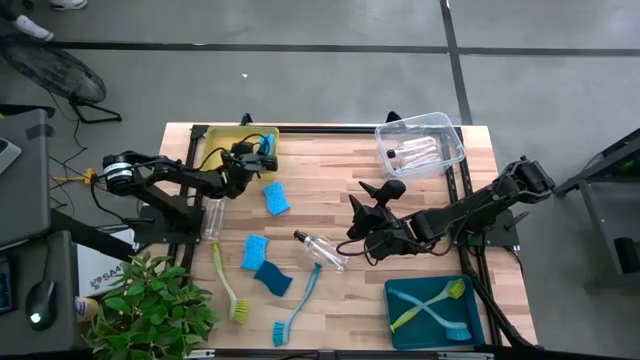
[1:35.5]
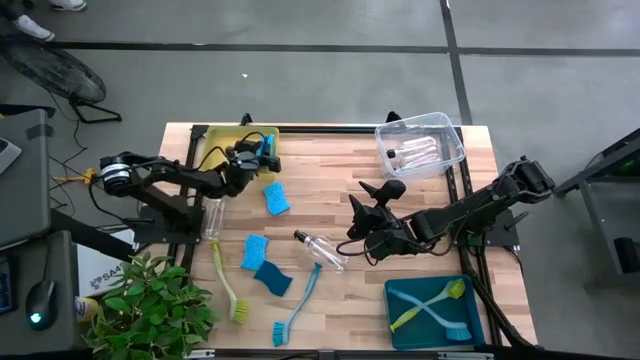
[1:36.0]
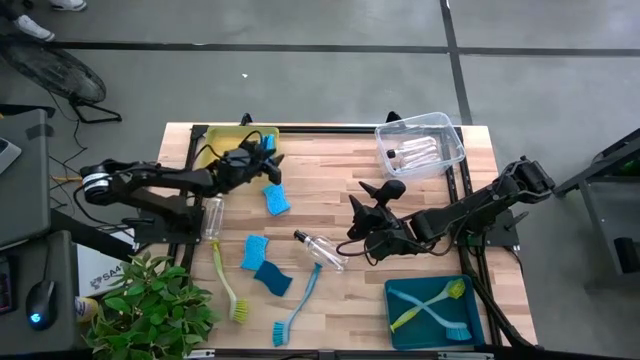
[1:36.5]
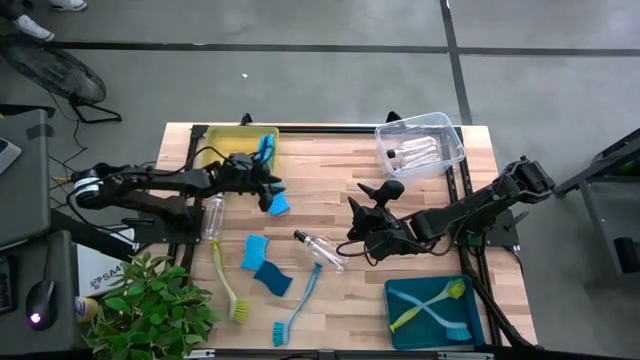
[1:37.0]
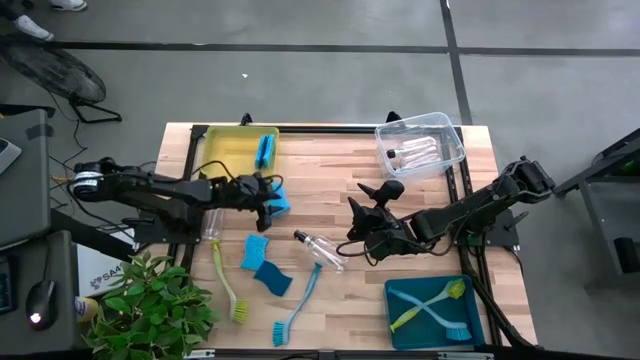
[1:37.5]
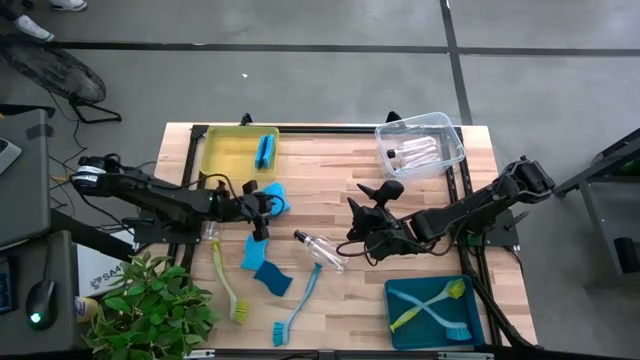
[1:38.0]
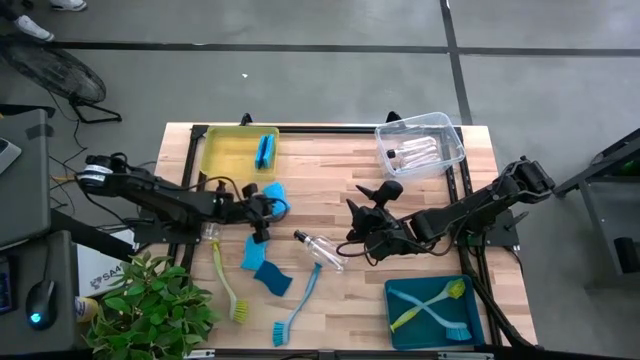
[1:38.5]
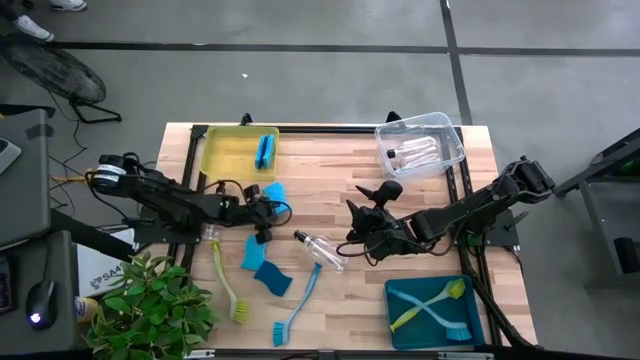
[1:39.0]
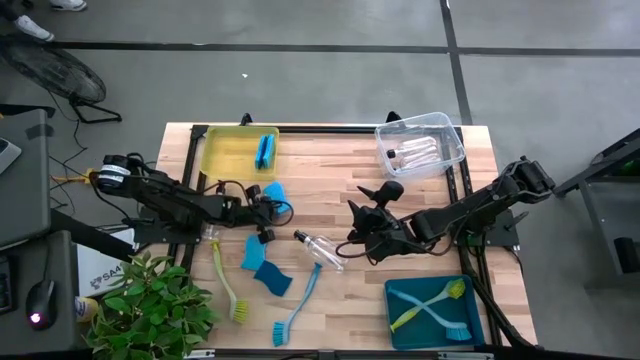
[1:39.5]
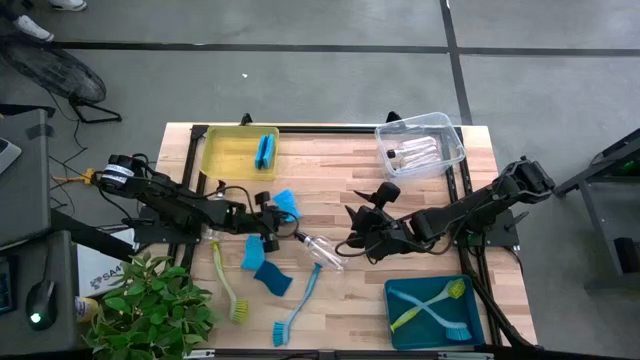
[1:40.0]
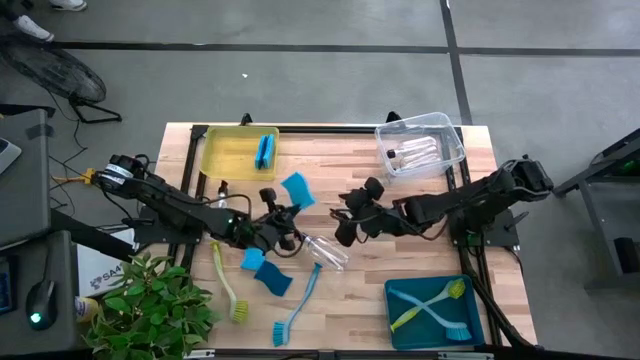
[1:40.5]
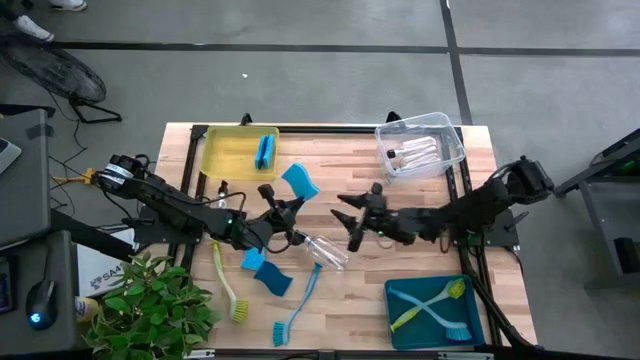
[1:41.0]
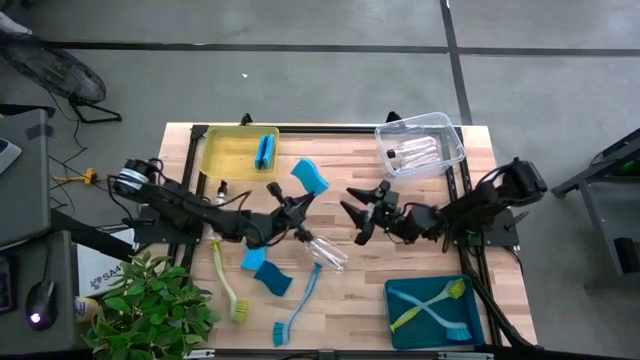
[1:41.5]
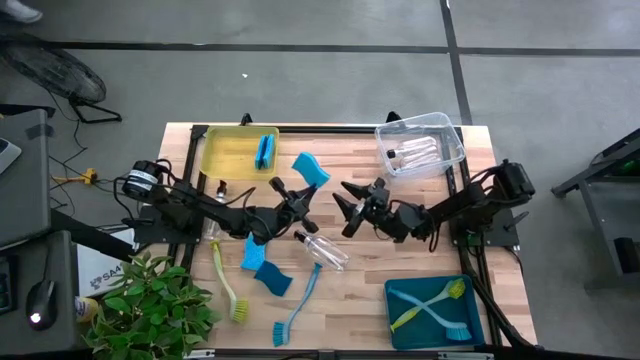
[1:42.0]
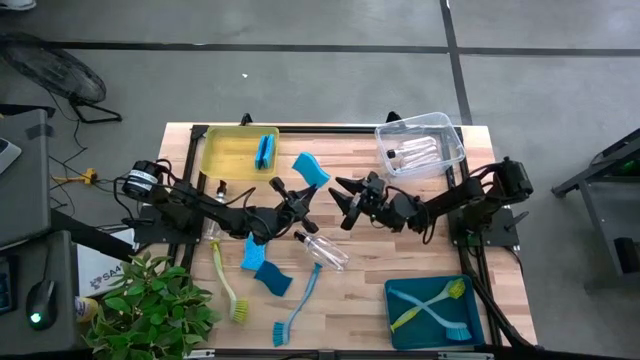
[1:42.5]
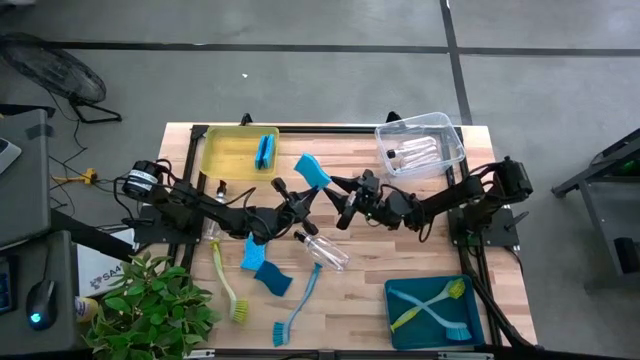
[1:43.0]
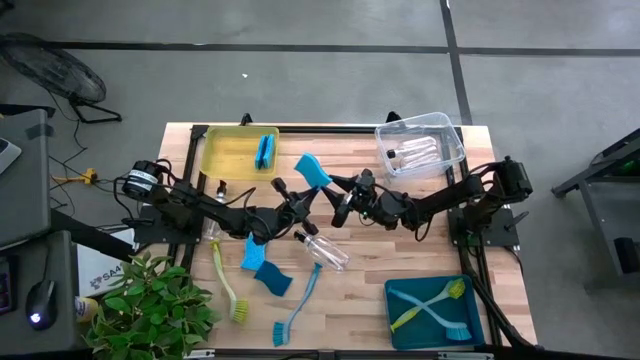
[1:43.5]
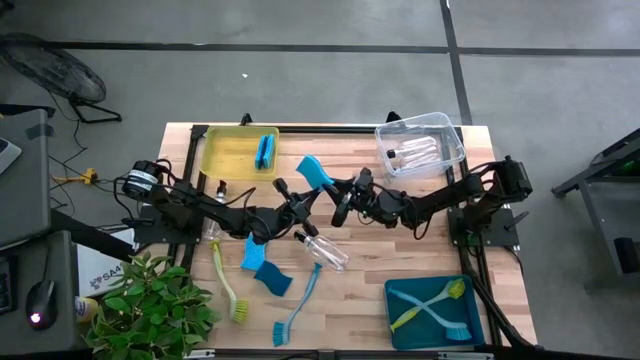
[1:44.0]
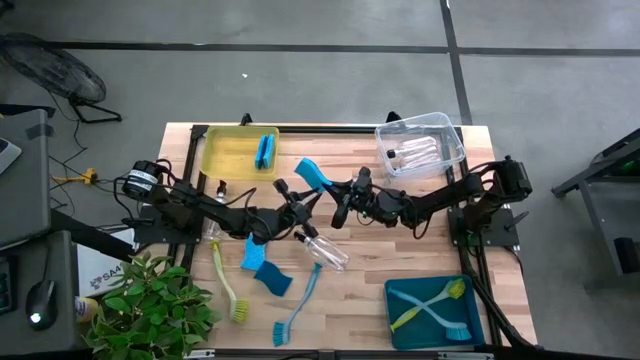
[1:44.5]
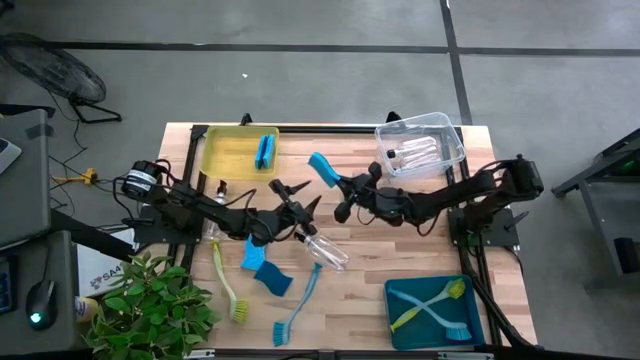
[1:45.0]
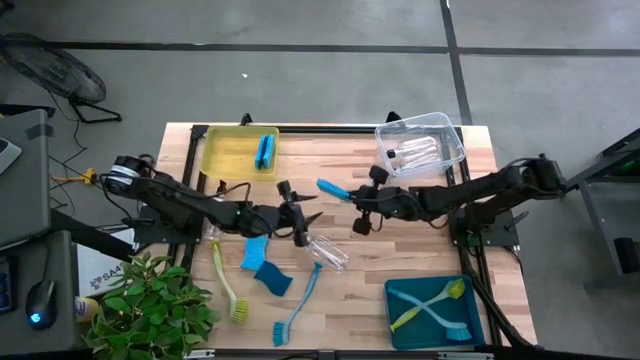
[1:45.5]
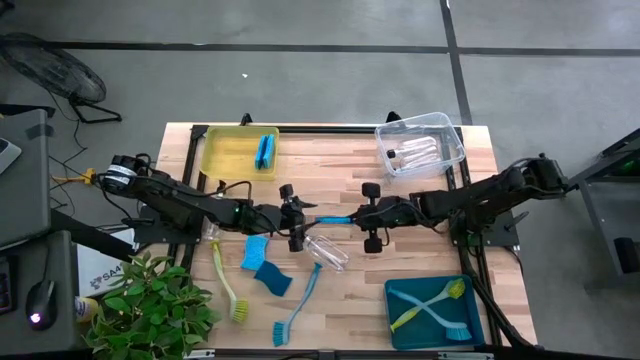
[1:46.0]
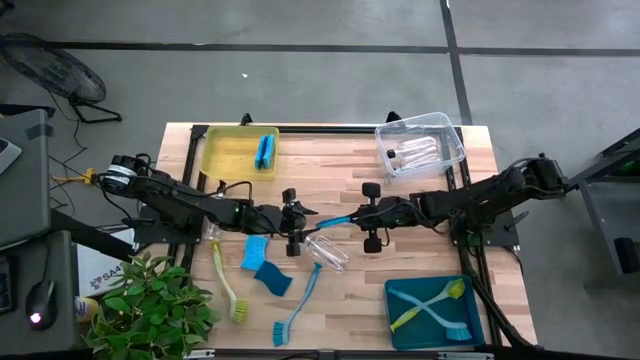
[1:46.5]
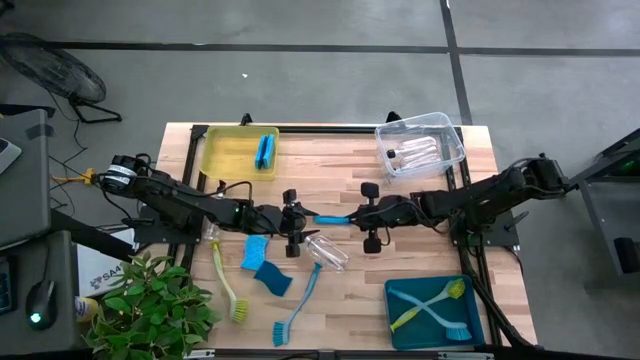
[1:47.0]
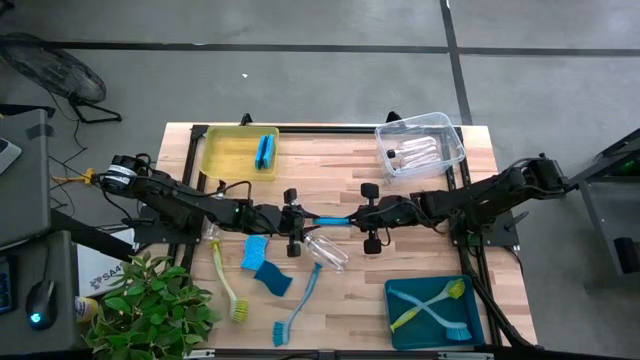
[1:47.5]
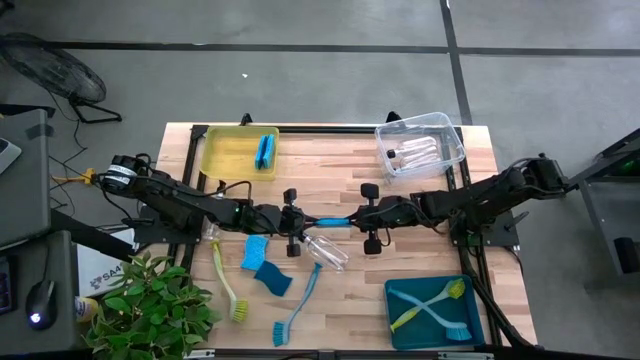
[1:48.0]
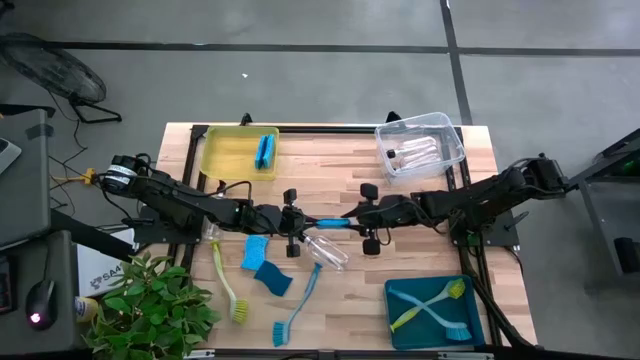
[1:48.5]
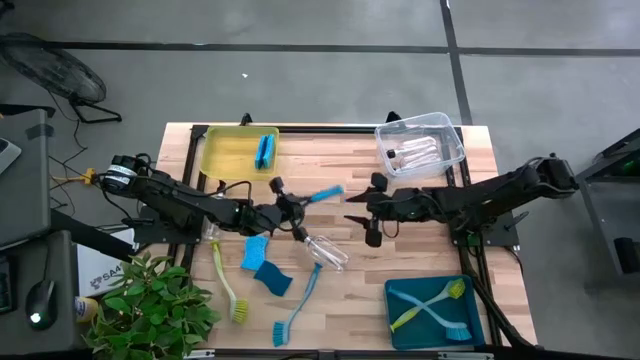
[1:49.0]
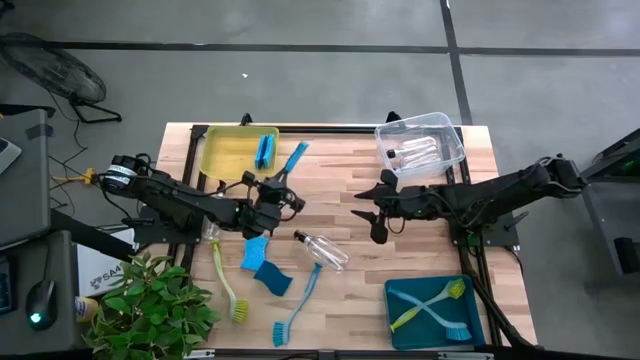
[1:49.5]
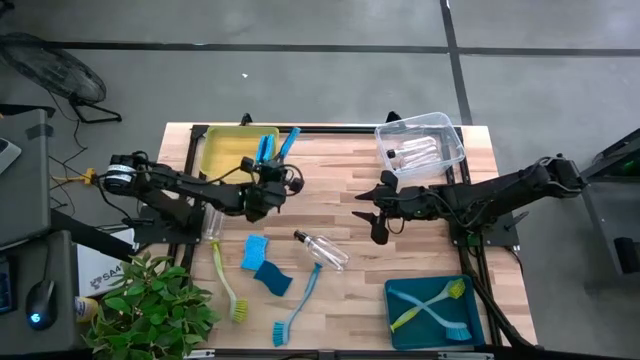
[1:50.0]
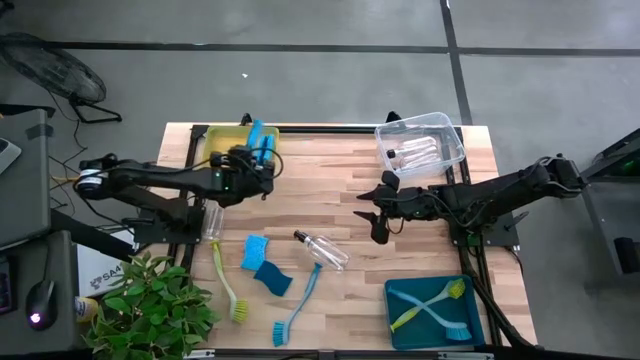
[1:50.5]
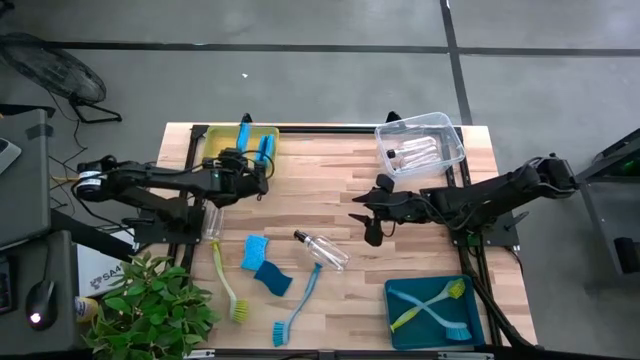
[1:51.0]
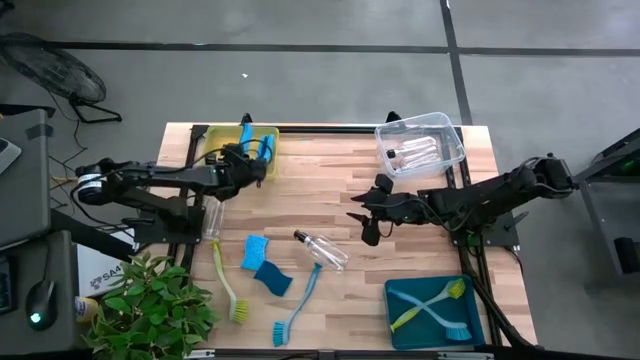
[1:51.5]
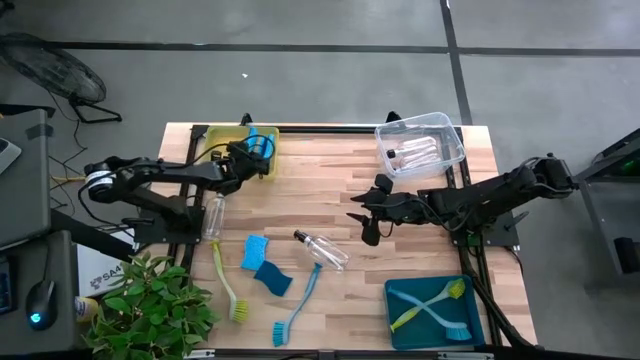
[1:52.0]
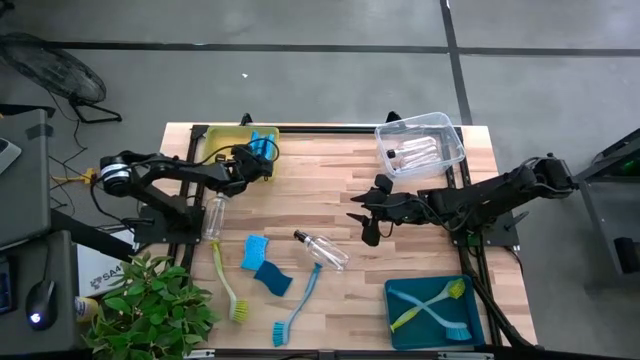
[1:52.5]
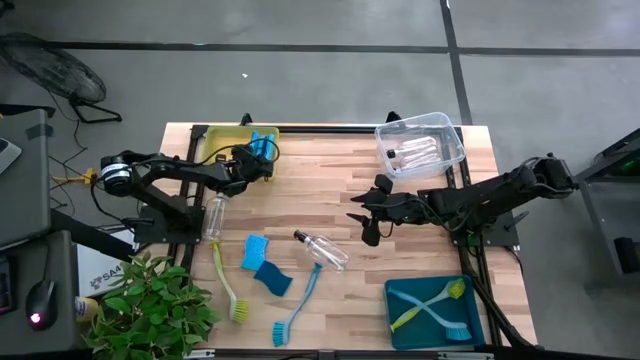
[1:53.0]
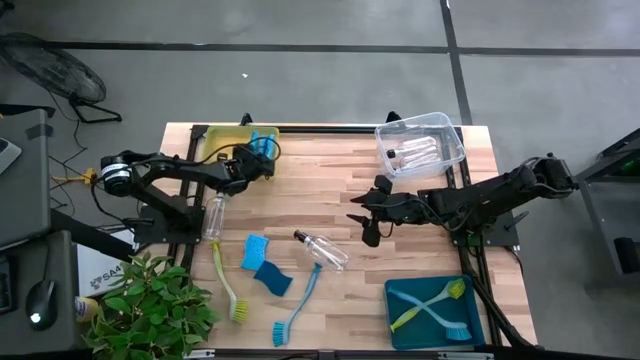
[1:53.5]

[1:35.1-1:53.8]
Task: Pick & Place Kitchen Sink Supplies
Put the blue sponge into the yellow bin

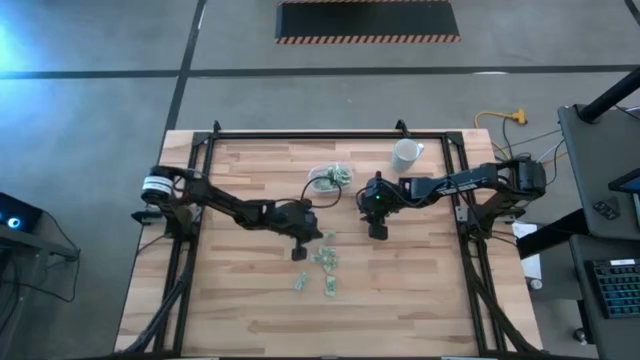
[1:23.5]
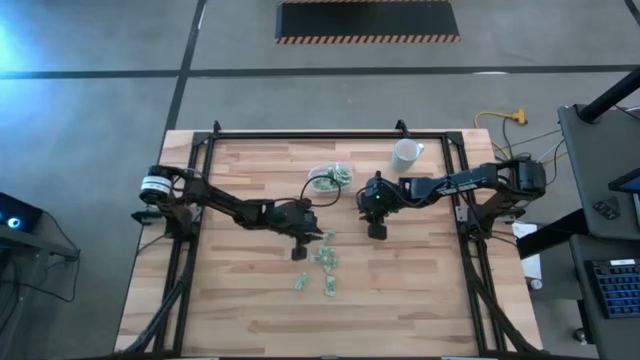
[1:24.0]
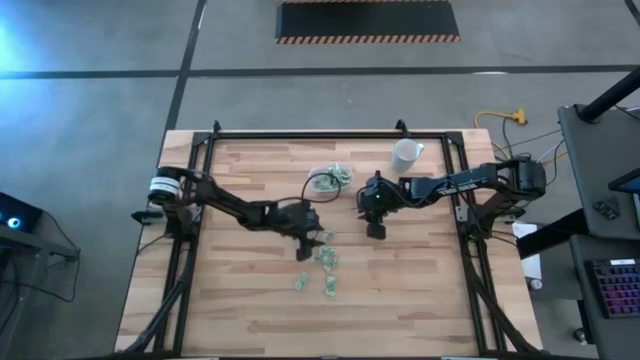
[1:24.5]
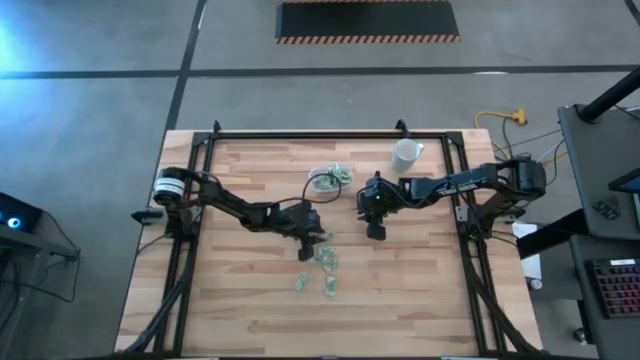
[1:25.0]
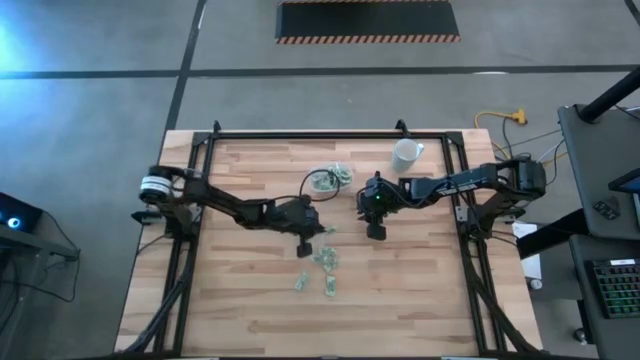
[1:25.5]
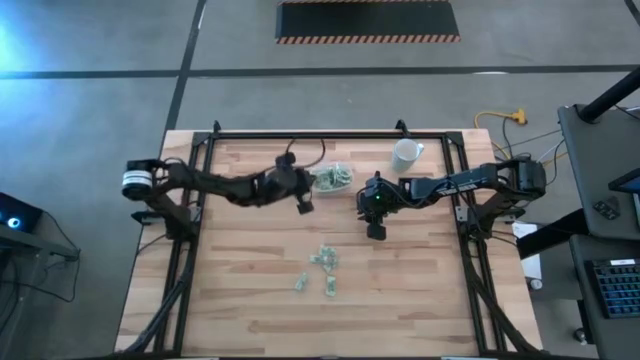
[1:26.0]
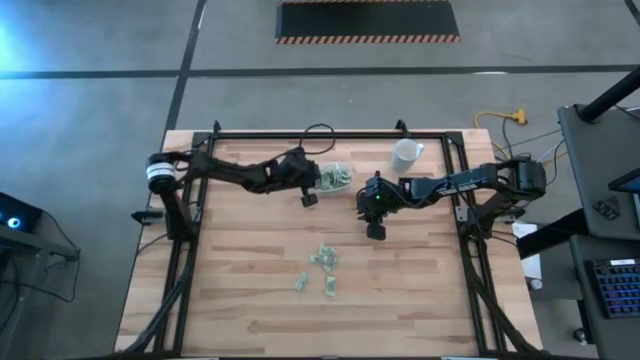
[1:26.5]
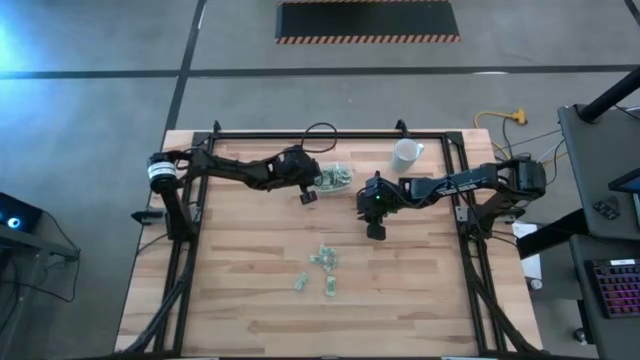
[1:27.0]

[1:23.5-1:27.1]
Task: Pick and place Stevia / Truvia into bins
Put the stevia packet into the transparent container
